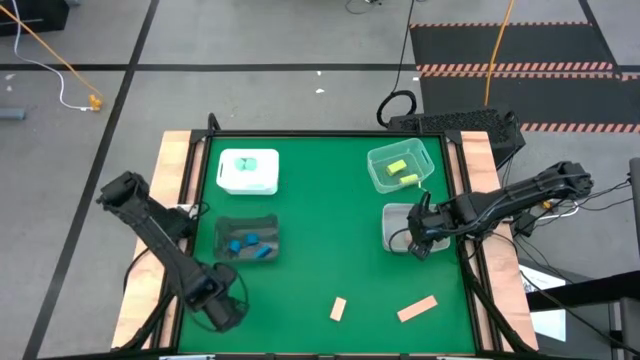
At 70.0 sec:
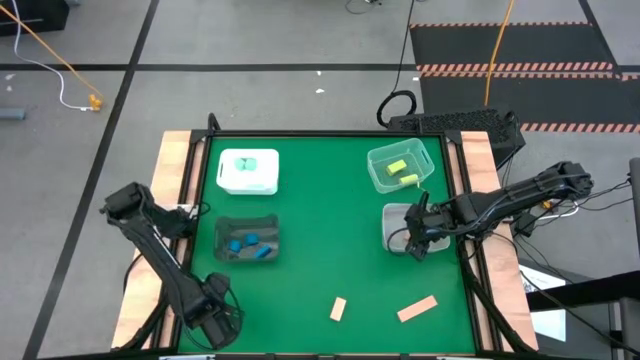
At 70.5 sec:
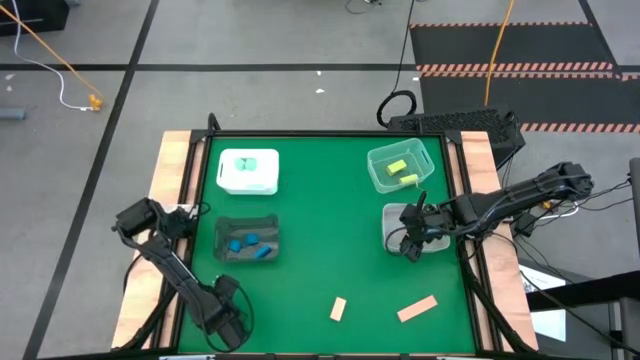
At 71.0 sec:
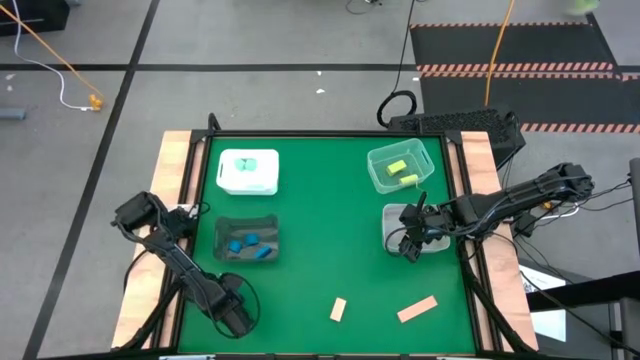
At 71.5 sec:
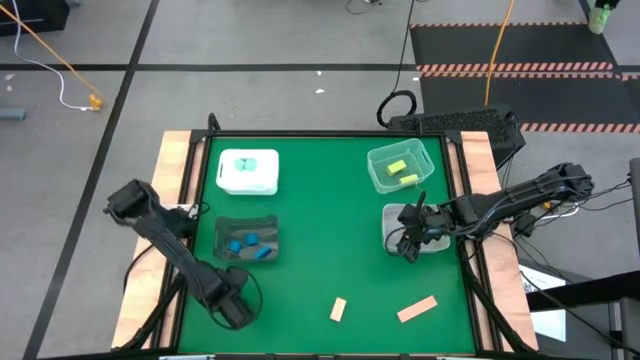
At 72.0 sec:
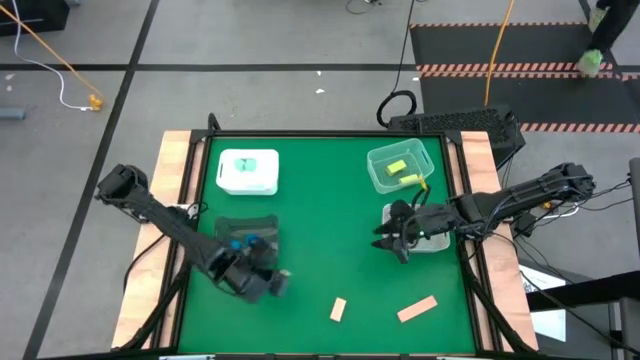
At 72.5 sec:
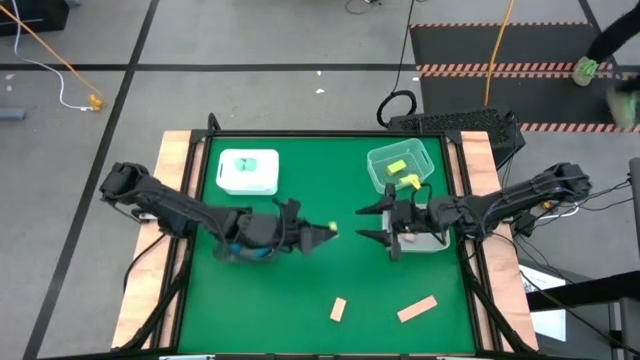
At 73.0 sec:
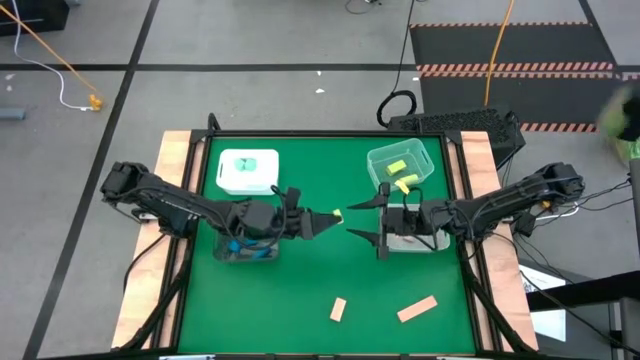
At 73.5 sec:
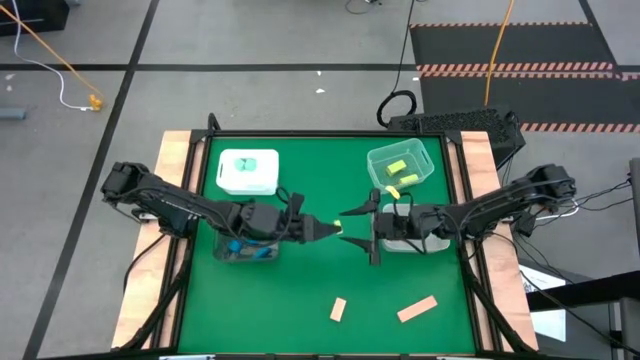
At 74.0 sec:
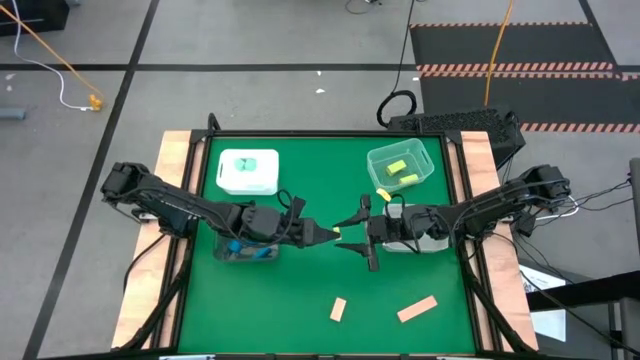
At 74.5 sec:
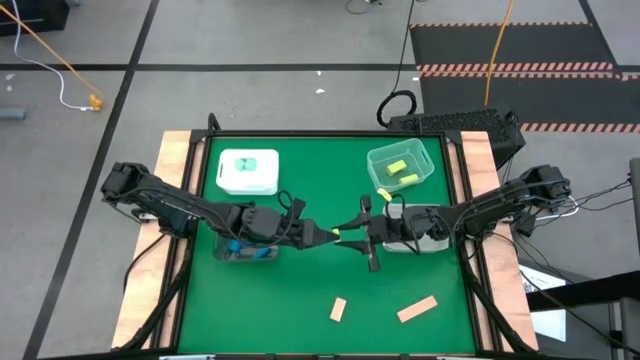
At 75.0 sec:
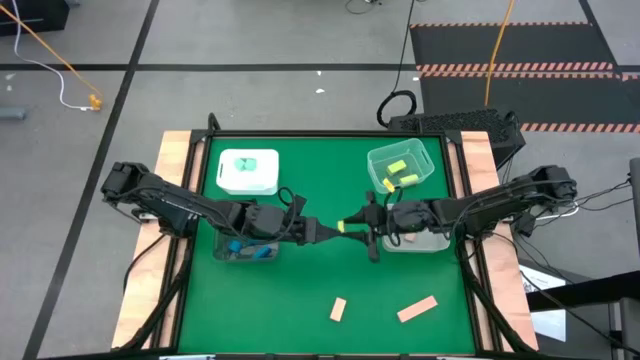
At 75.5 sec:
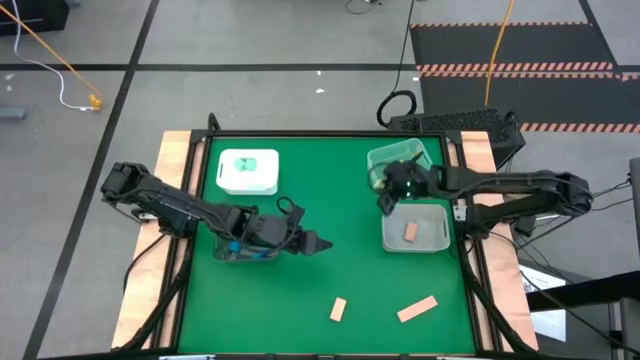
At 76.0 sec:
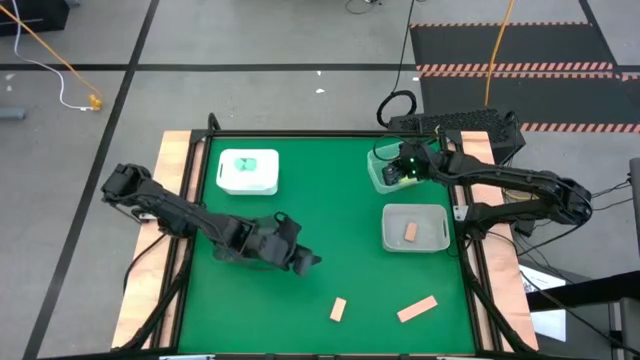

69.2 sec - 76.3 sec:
Task: Sort & place blocks by color
Put the light green block into the transparent bin

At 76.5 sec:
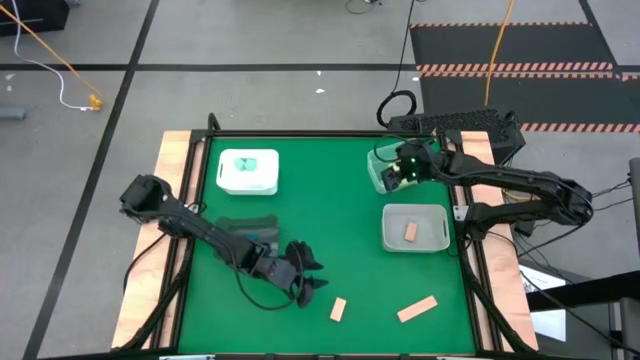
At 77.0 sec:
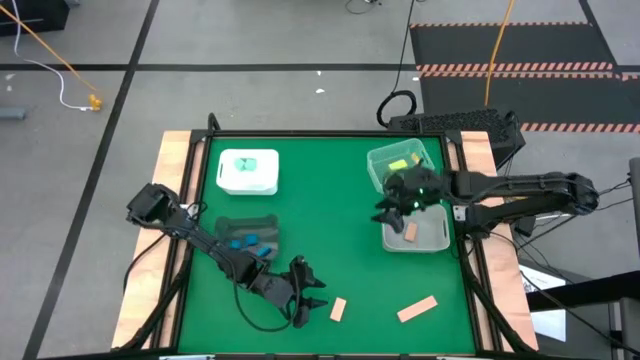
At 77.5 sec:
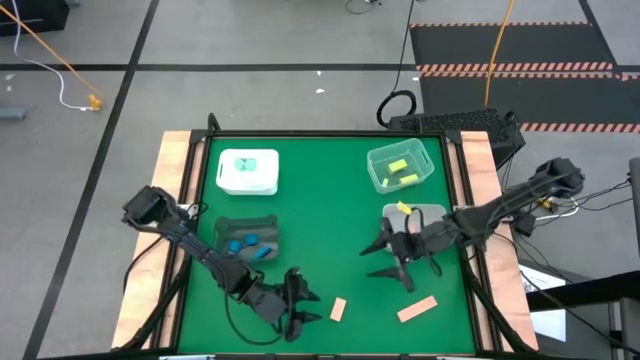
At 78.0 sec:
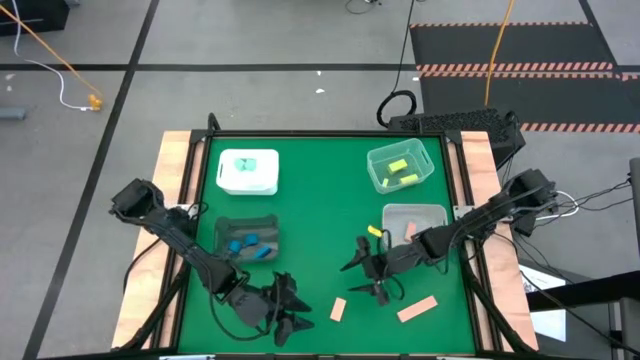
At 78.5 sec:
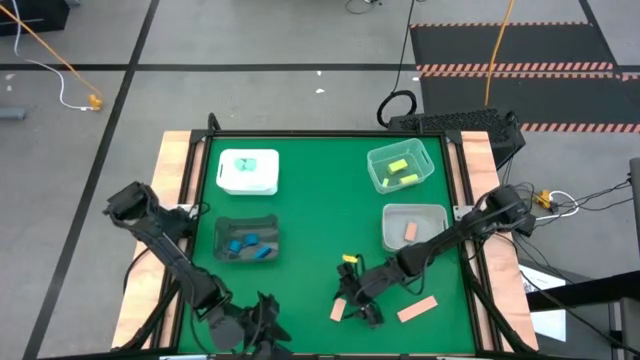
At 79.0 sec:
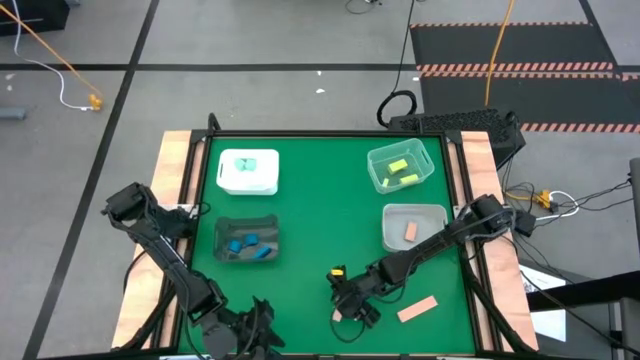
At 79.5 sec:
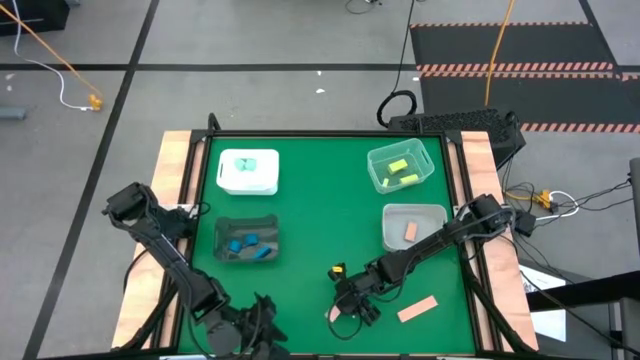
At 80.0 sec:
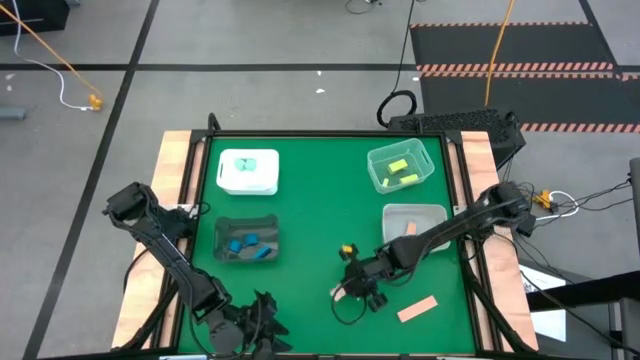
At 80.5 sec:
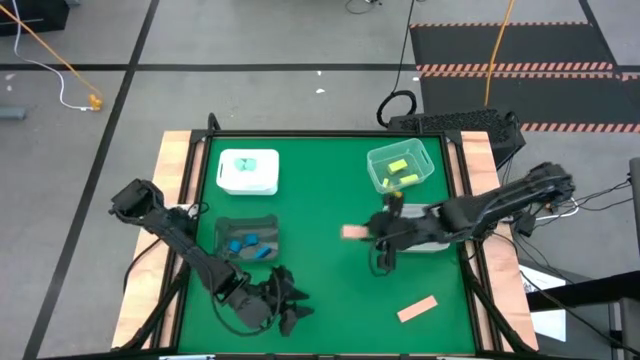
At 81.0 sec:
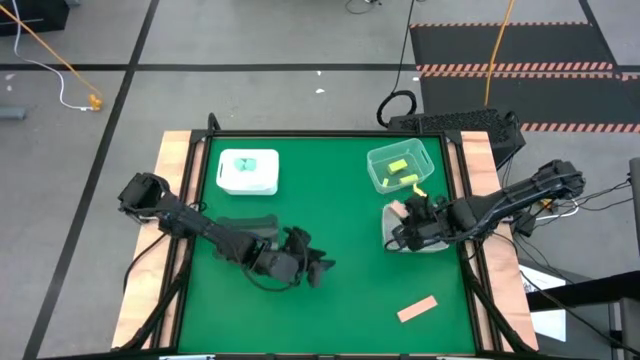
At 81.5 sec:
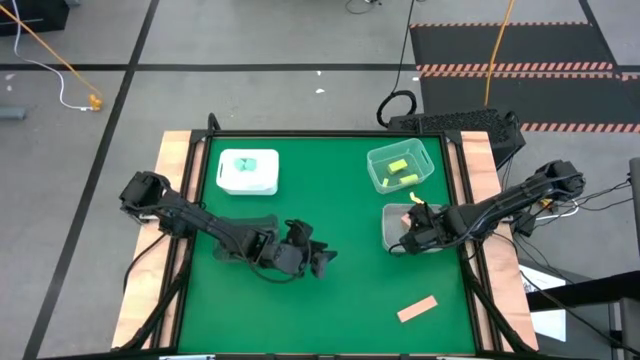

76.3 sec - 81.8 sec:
Put the brown block into the gray bin

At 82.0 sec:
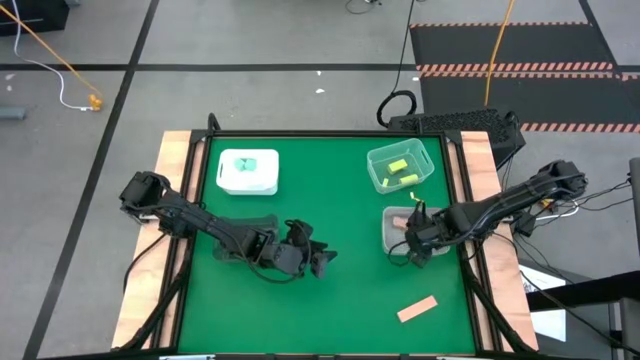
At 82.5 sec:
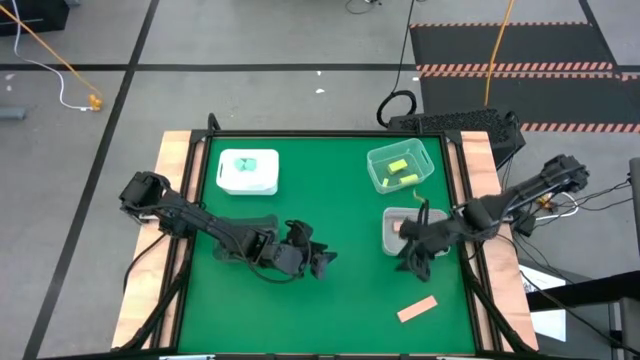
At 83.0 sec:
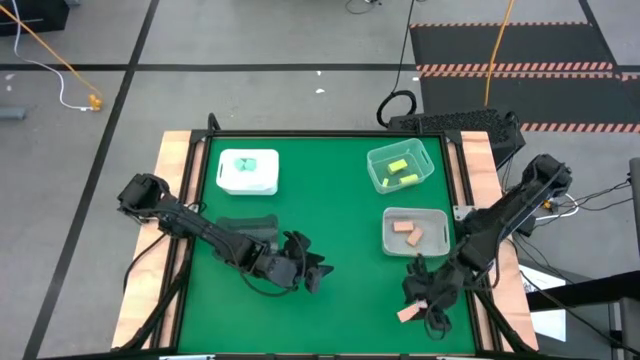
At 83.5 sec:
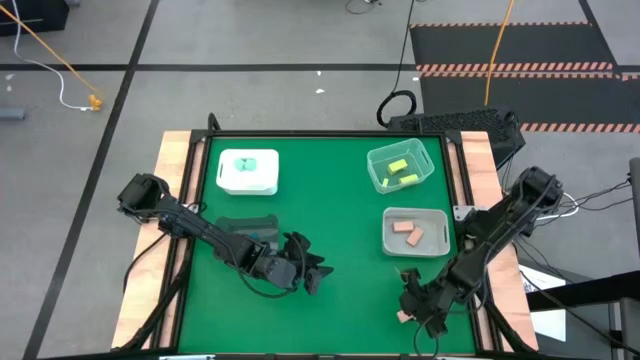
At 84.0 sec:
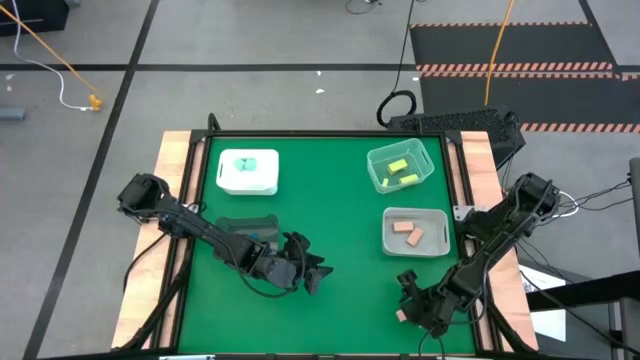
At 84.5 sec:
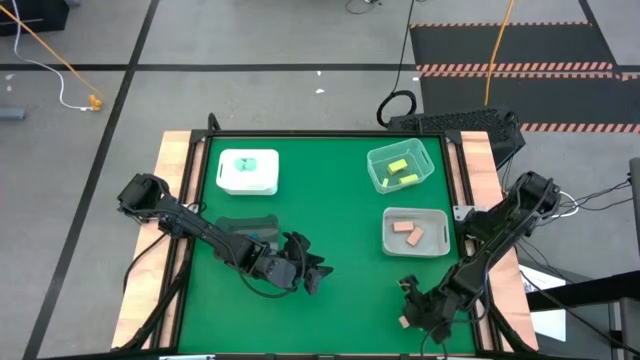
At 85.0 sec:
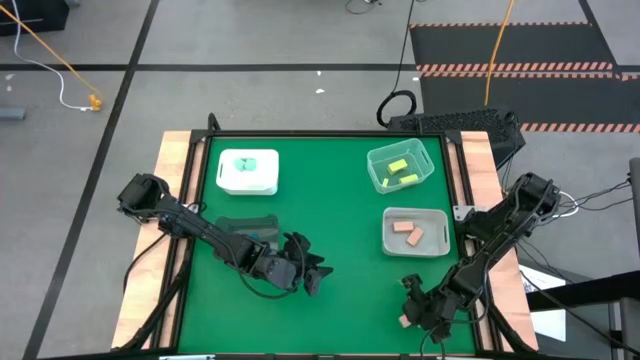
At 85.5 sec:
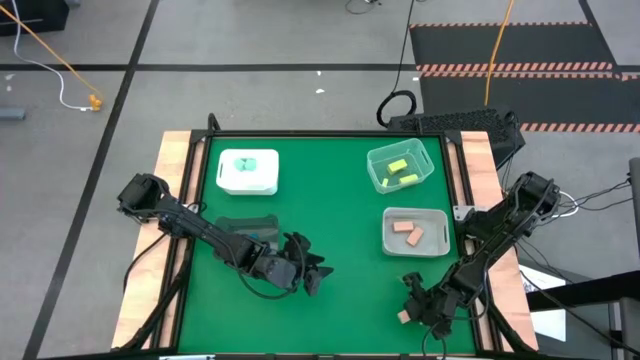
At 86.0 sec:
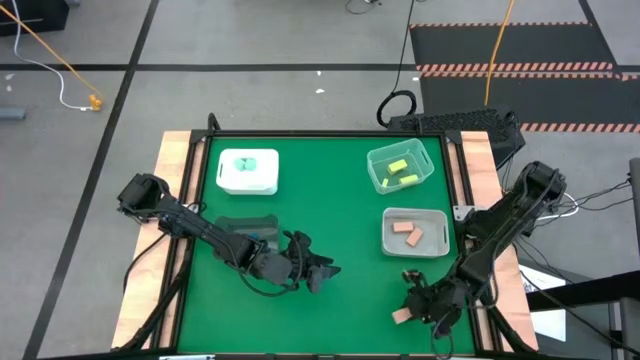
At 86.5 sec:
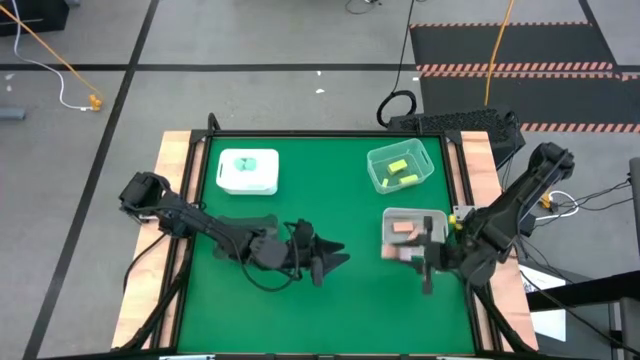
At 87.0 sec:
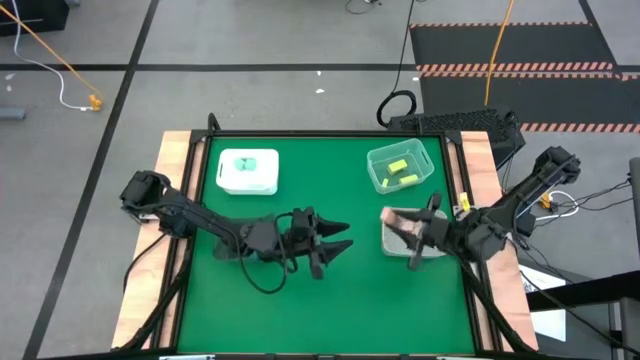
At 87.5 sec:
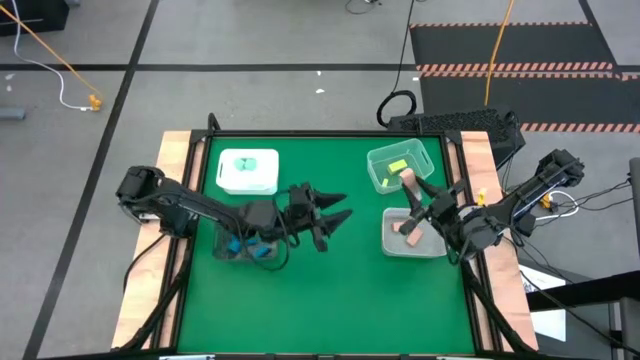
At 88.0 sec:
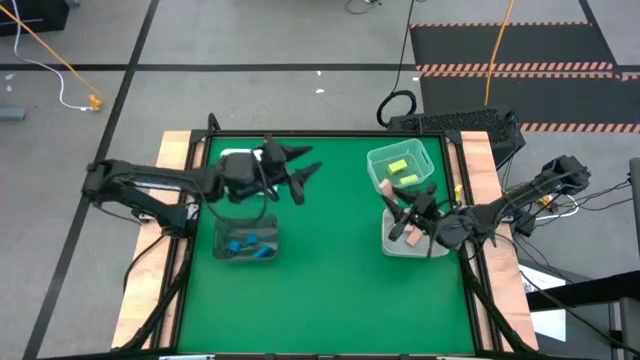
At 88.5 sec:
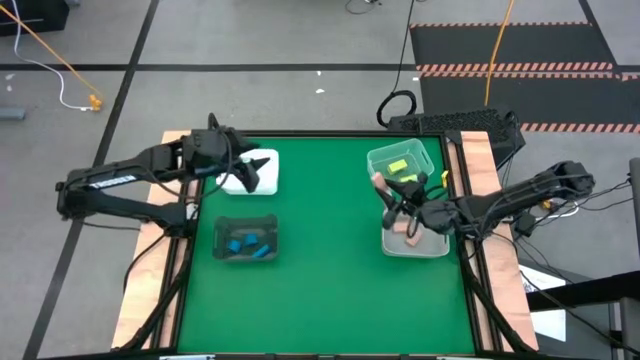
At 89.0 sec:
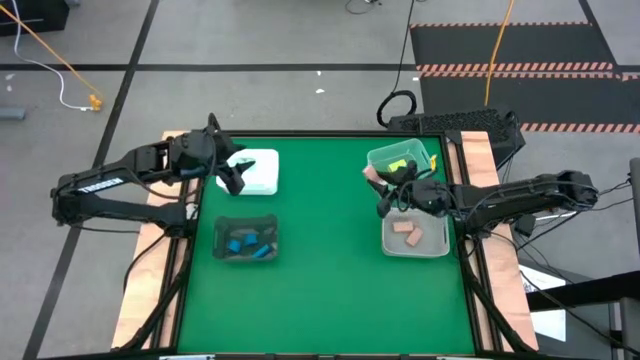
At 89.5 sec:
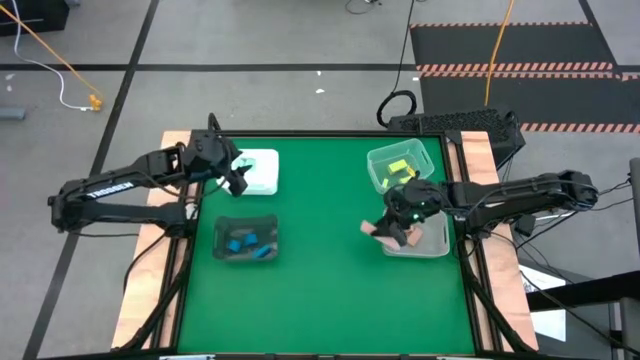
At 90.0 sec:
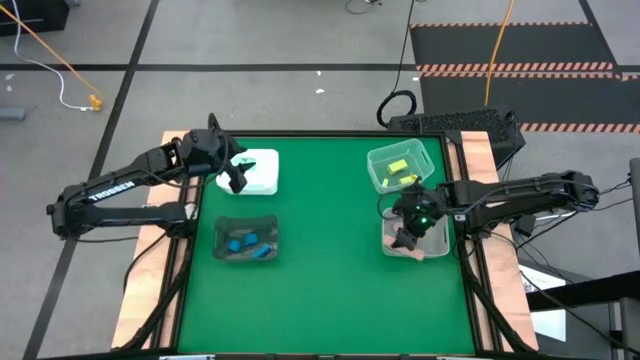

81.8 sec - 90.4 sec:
Put the brown block into the gray bin

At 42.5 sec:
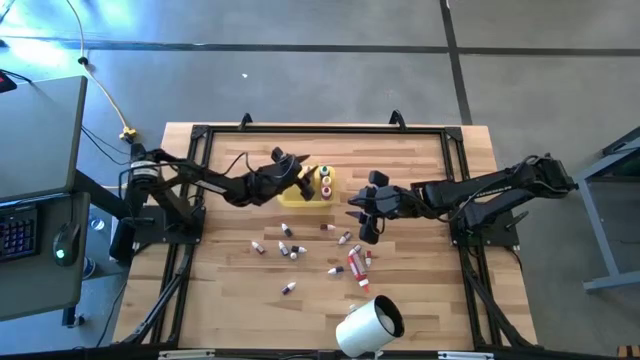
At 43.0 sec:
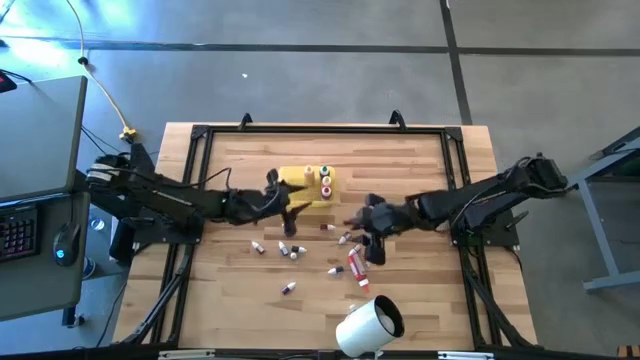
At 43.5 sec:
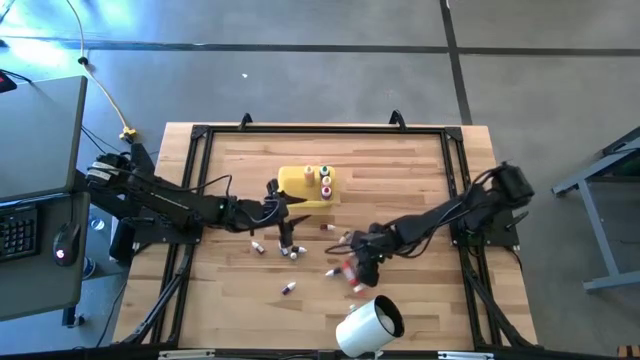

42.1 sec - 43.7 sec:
Task: Pick & Place food coloring
Put the large red food coloring bottle into the yellow container
